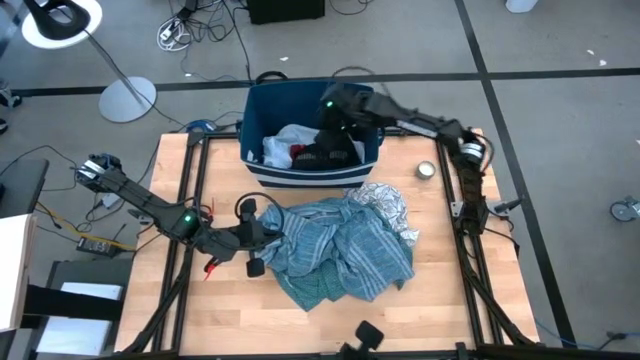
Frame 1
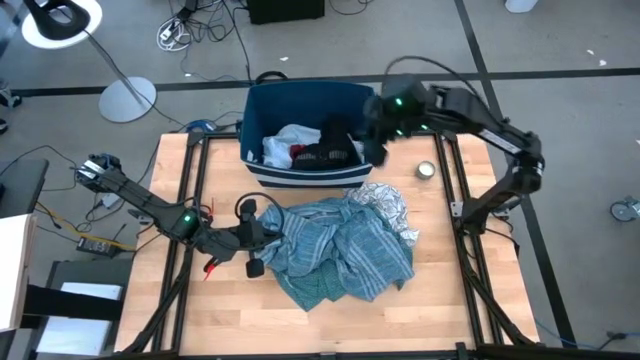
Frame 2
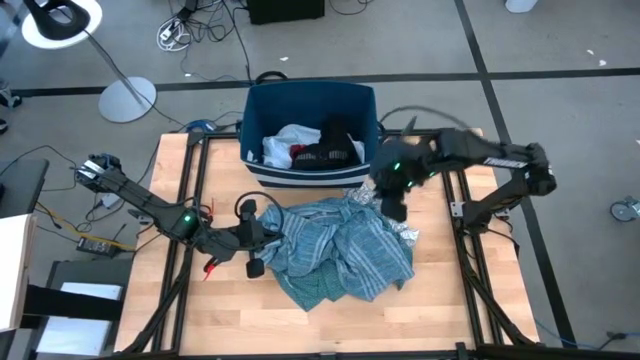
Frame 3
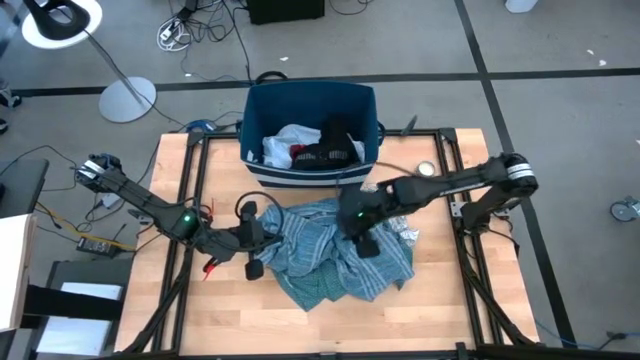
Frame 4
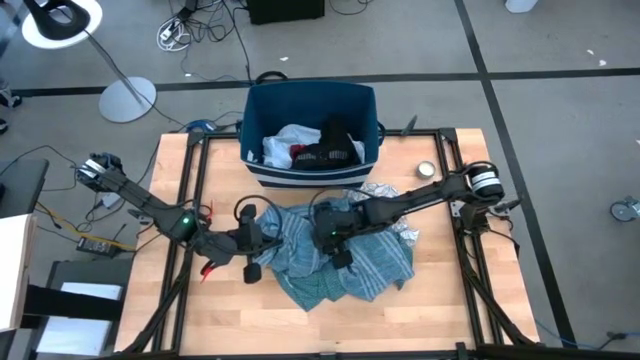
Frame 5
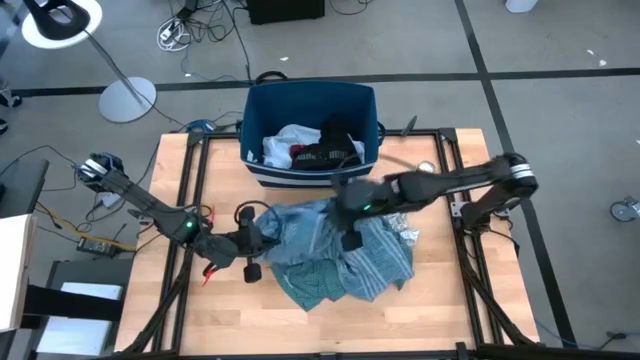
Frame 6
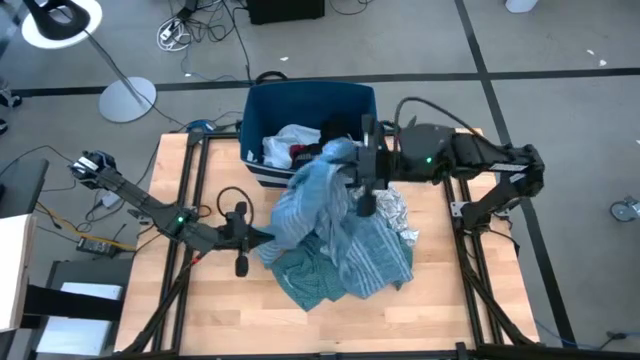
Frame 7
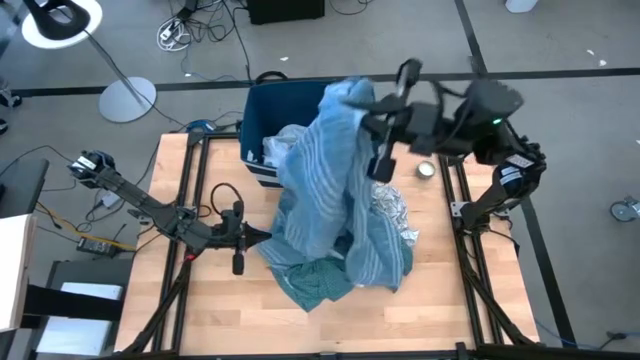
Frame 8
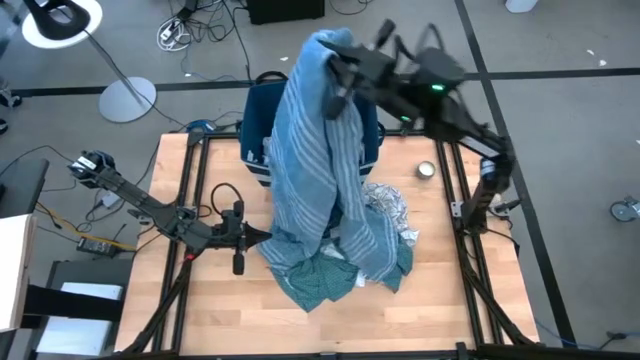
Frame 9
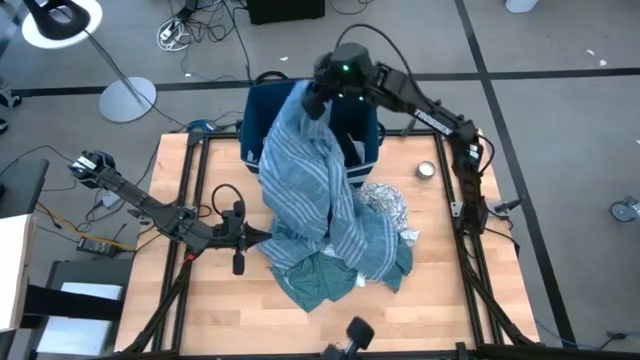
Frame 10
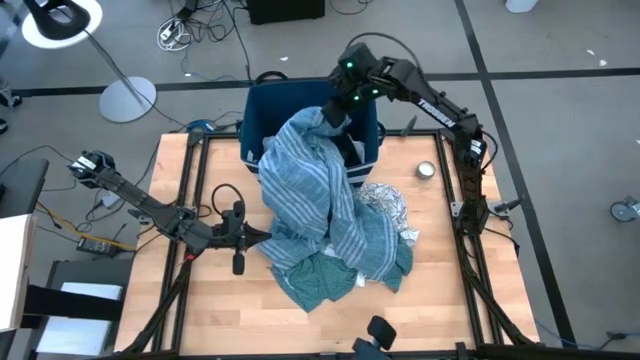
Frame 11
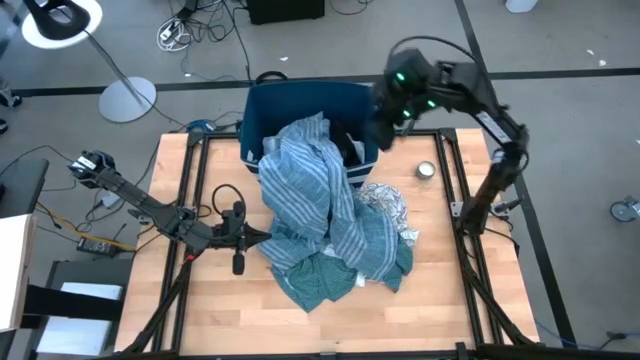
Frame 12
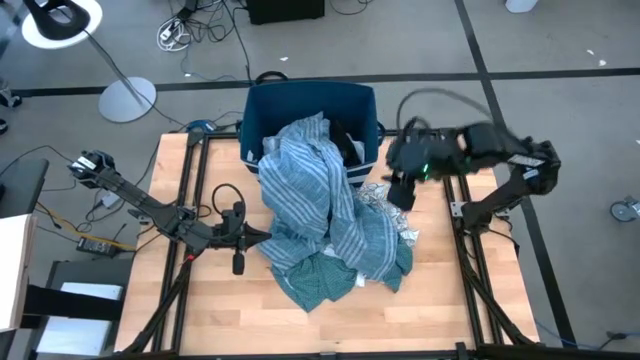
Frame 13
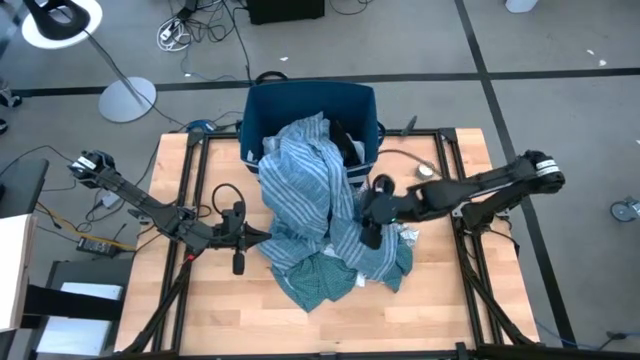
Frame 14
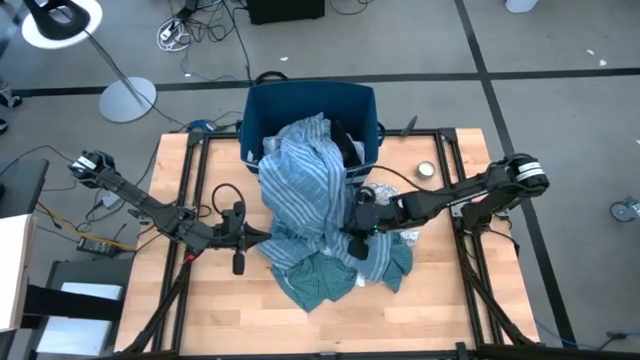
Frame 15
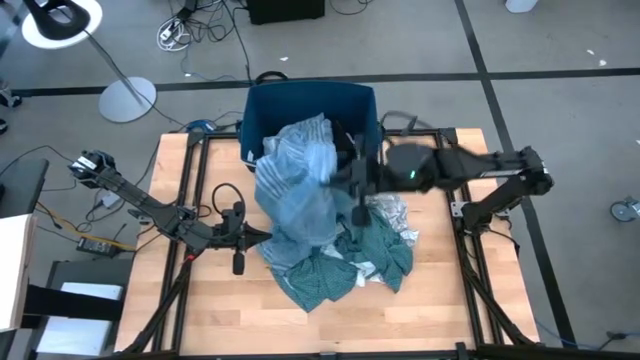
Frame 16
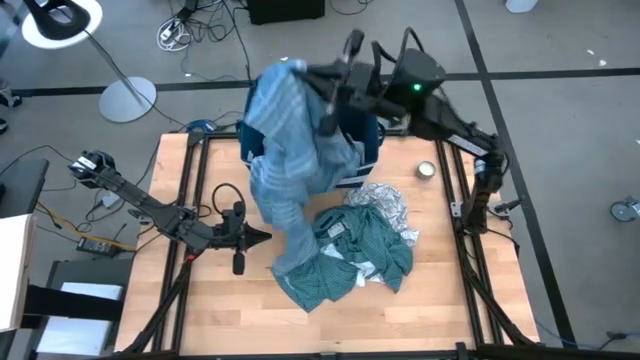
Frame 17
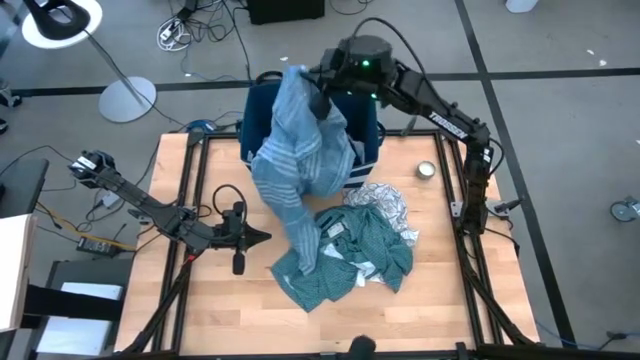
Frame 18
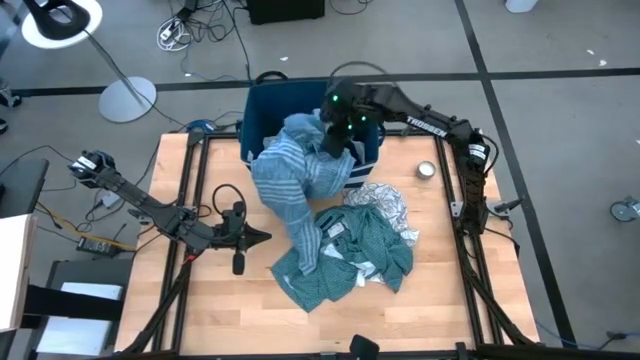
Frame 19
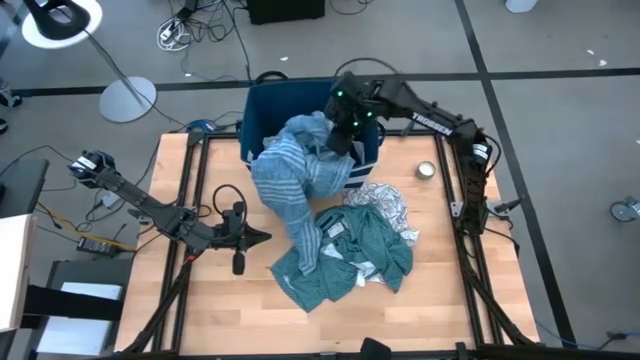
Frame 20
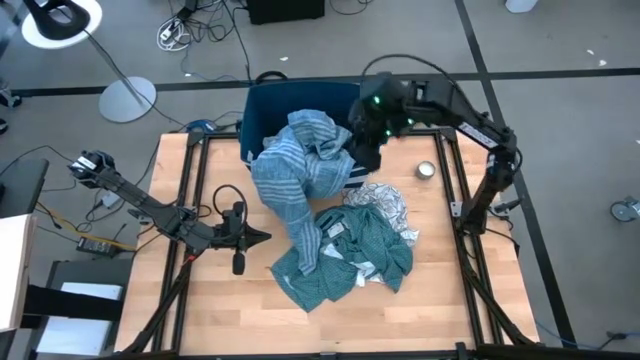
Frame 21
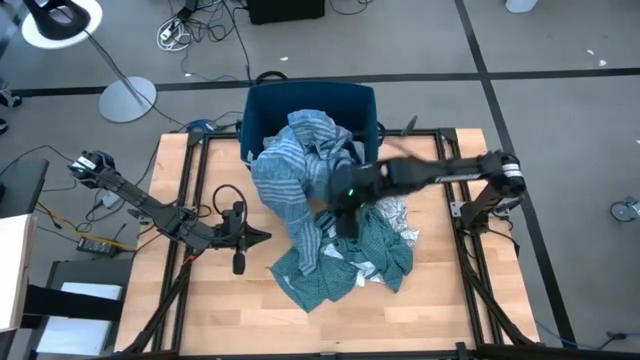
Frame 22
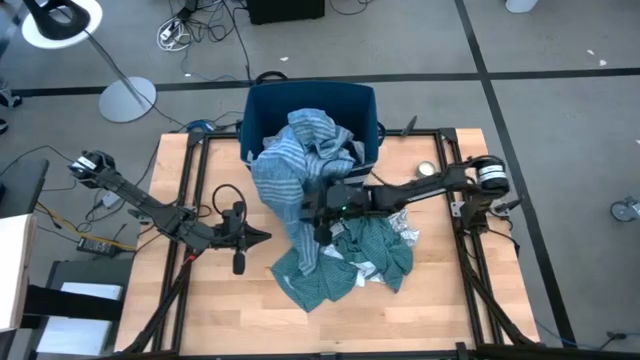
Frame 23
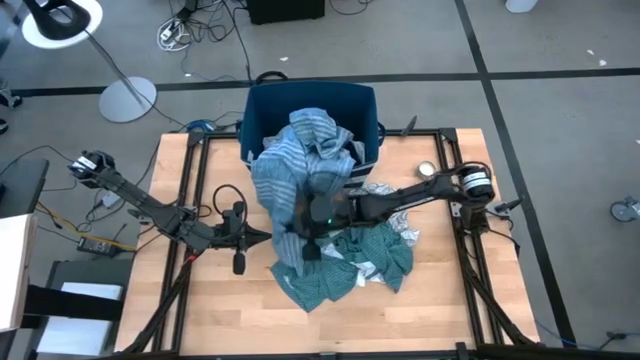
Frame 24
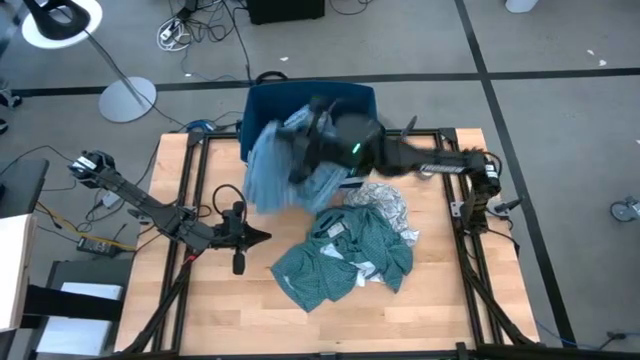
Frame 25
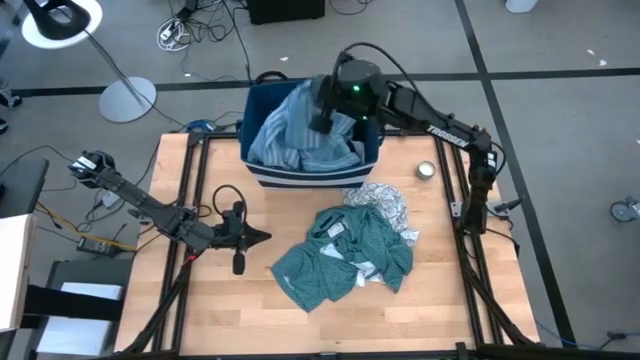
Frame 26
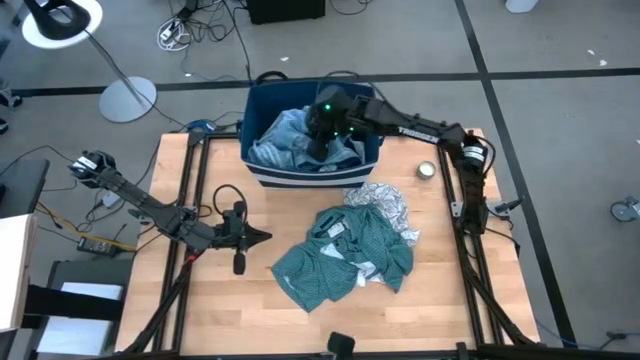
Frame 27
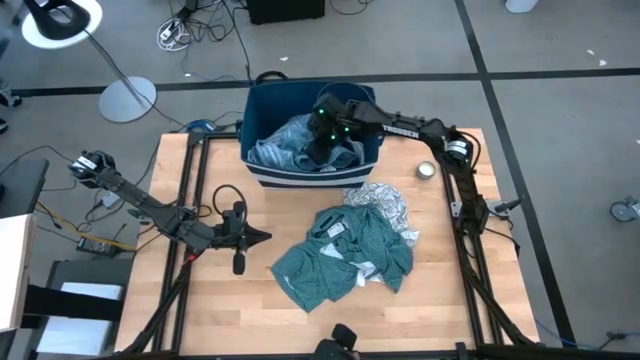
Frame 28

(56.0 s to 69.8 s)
Task: Sort clothes
Put the blue checkered polo into the blue laundry organizer

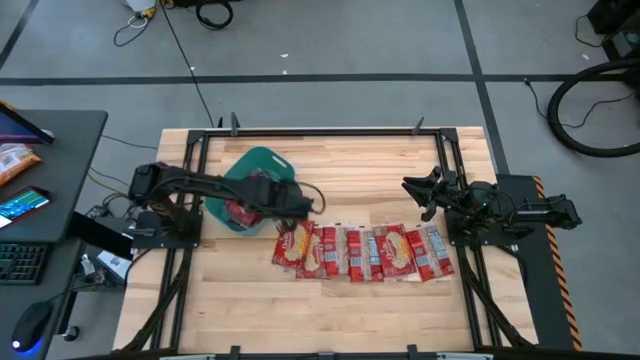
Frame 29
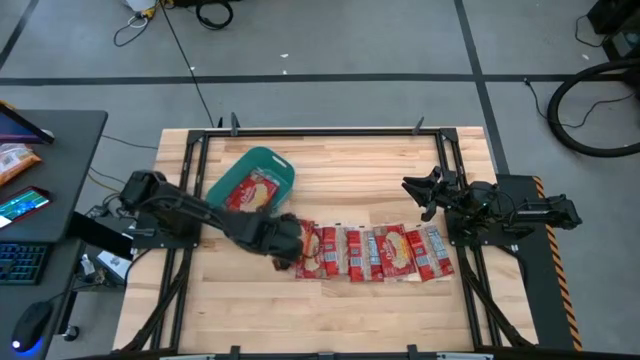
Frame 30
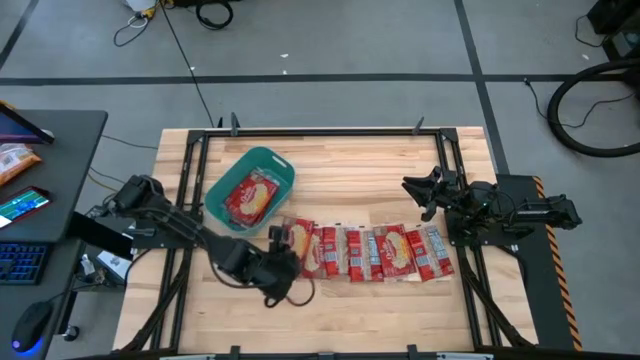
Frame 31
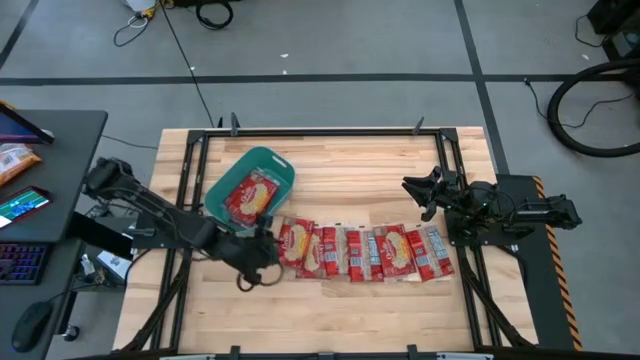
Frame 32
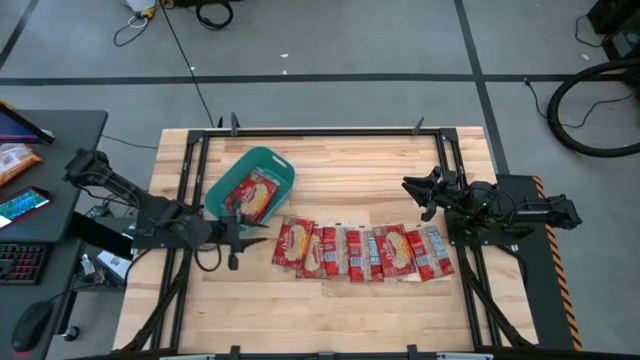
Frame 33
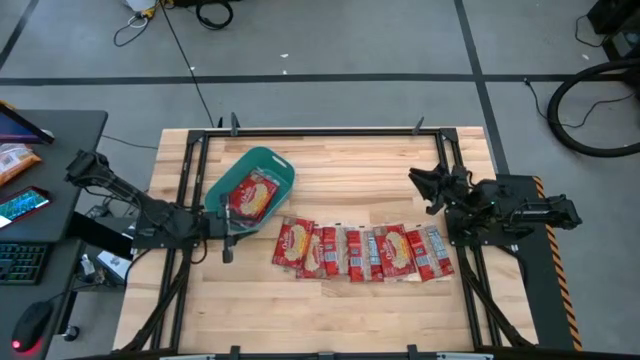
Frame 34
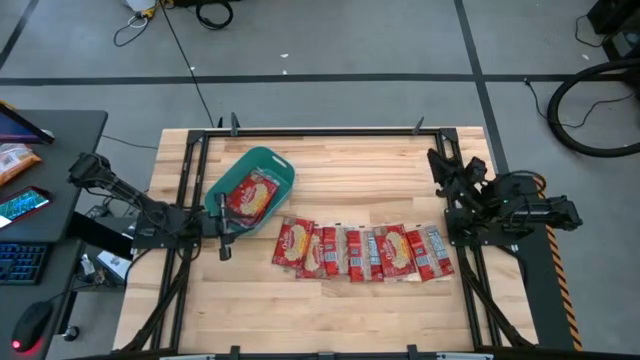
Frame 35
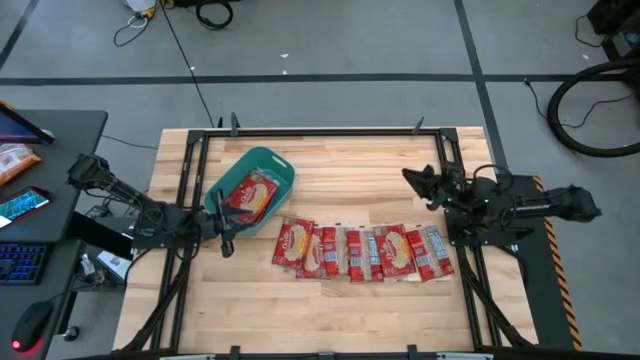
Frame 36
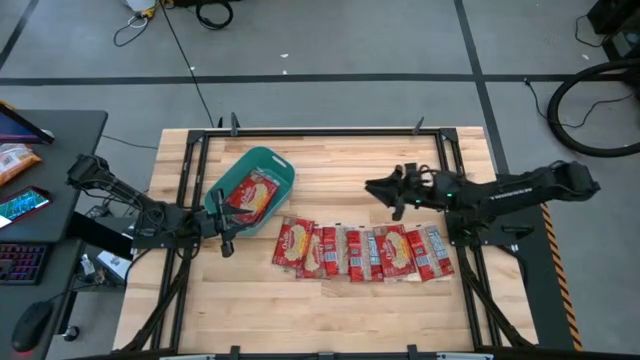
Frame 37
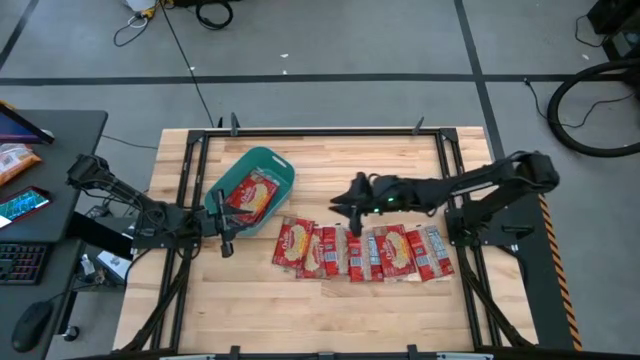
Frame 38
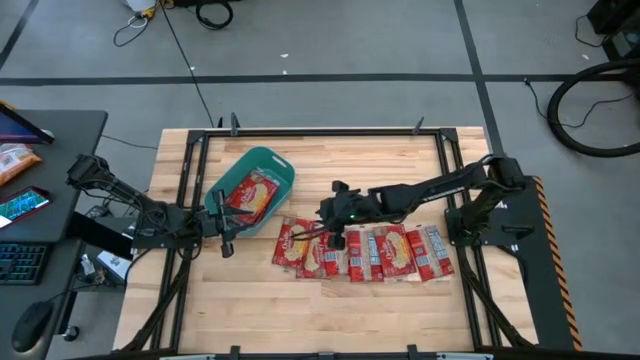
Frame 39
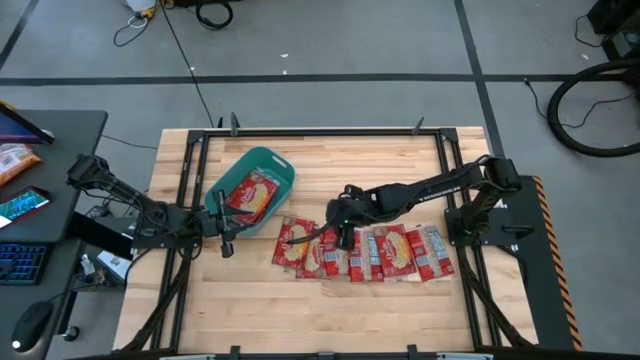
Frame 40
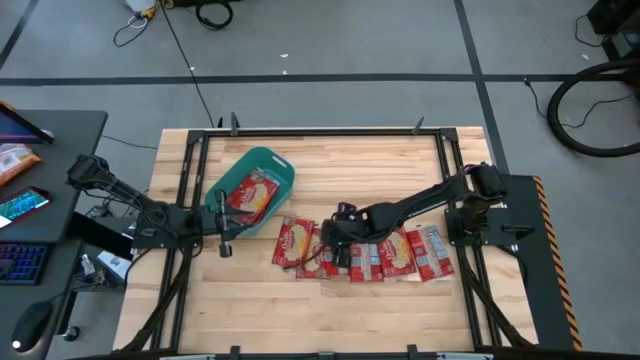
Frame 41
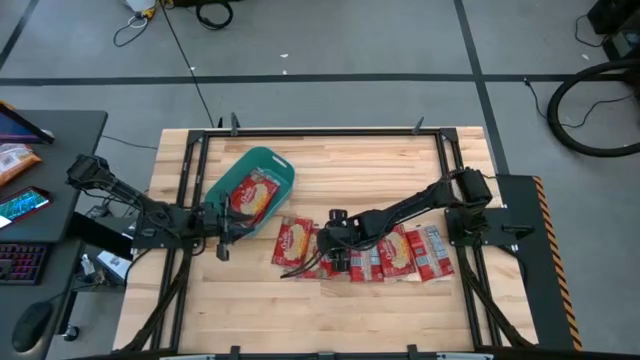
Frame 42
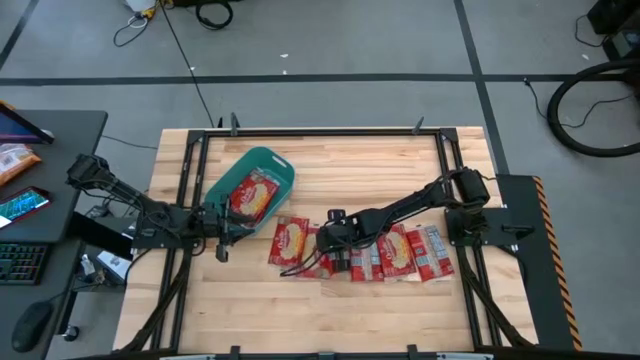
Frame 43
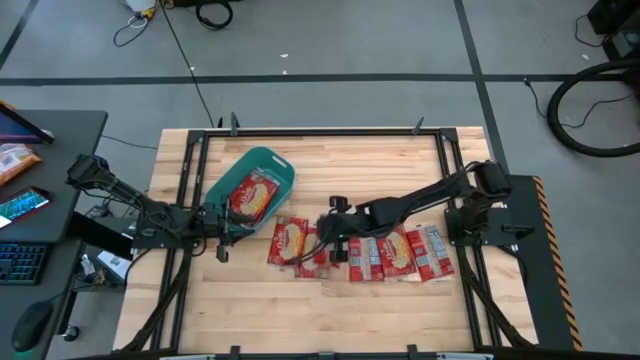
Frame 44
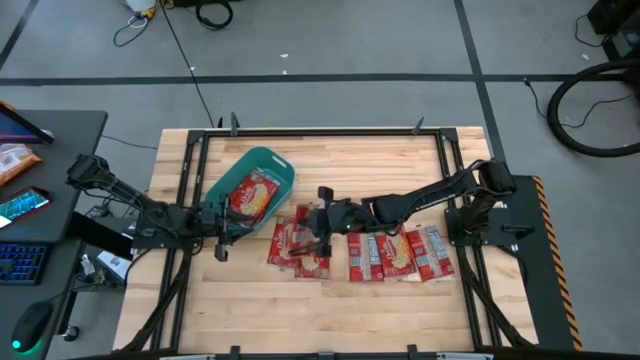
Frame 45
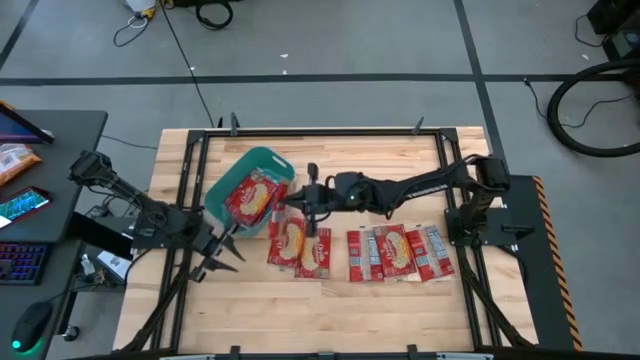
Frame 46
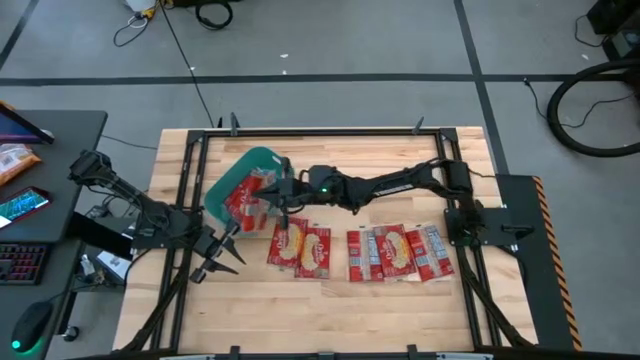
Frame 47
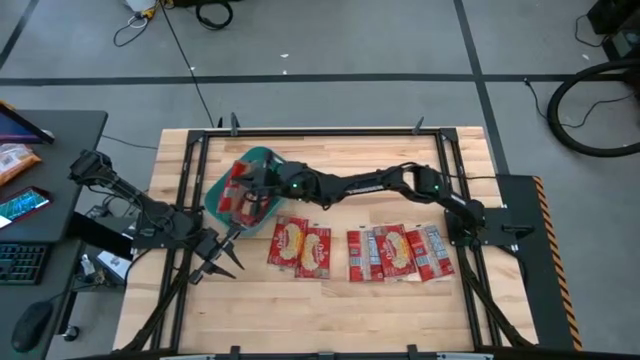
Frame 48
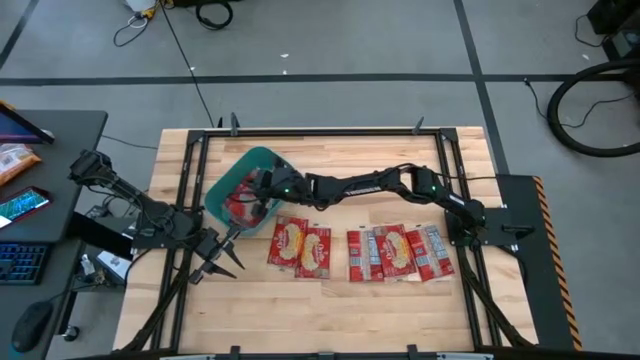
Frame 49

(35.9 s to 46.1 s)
Task: Sort popcorn bags into baskets
Put the red popcorn bag into the green bin
